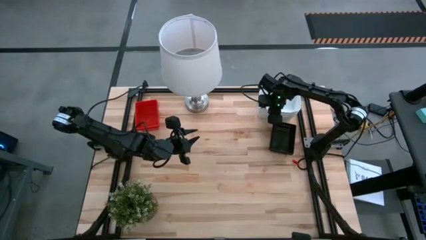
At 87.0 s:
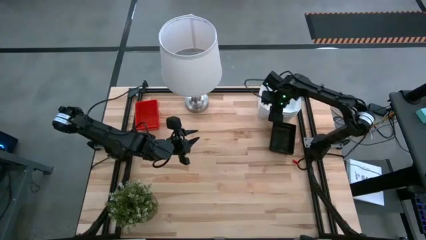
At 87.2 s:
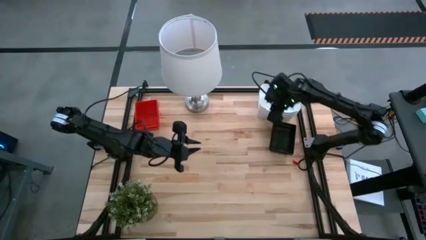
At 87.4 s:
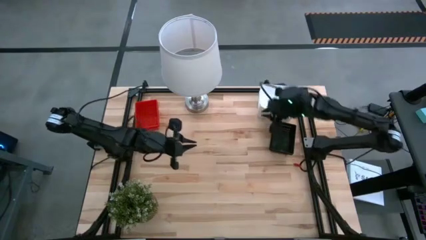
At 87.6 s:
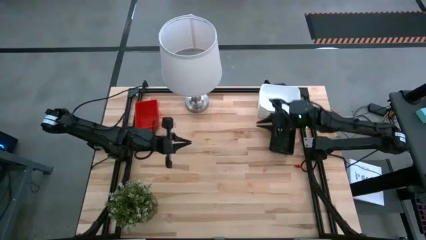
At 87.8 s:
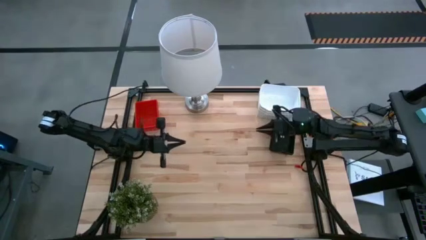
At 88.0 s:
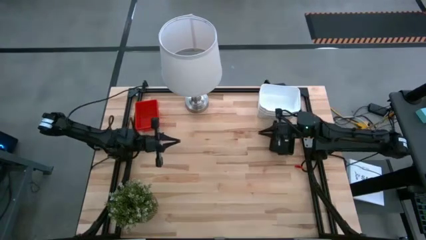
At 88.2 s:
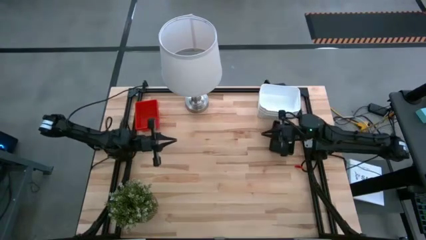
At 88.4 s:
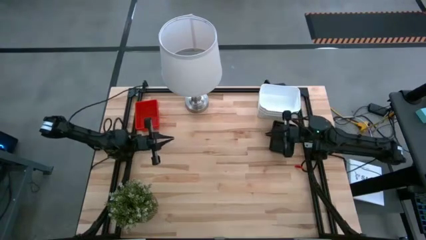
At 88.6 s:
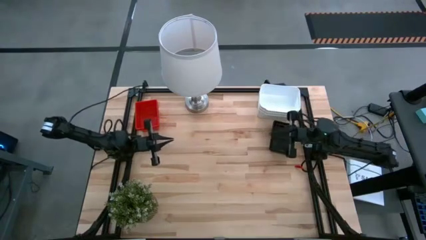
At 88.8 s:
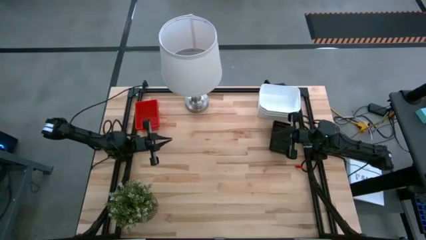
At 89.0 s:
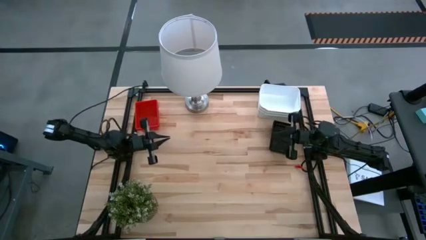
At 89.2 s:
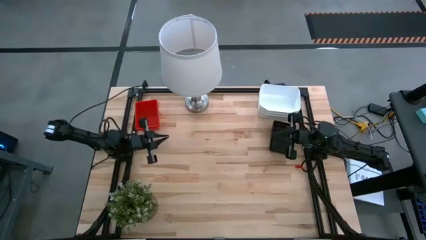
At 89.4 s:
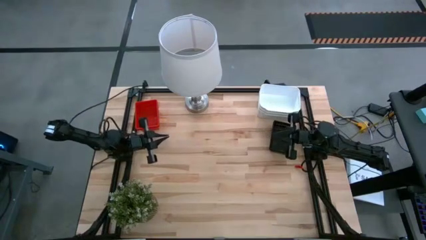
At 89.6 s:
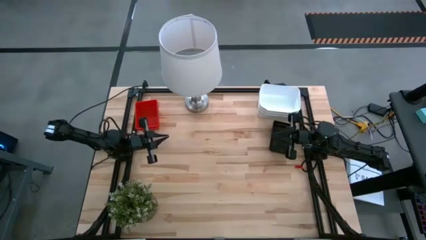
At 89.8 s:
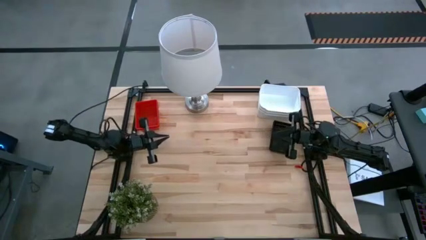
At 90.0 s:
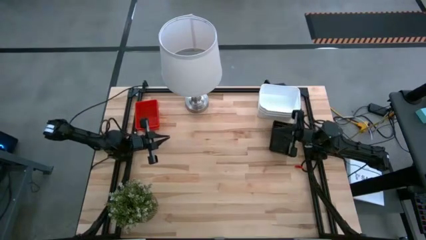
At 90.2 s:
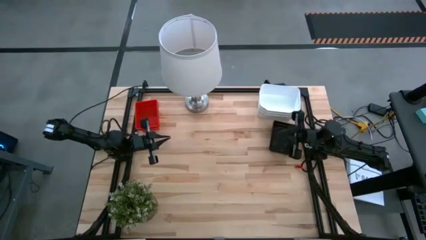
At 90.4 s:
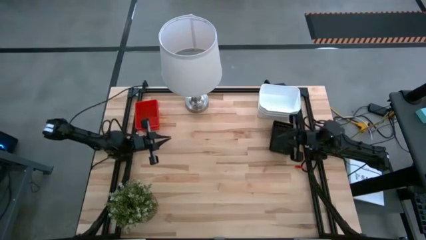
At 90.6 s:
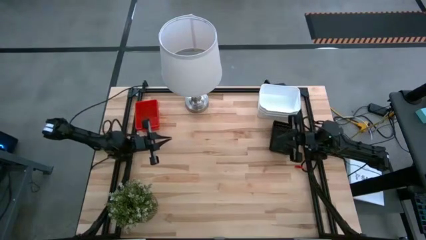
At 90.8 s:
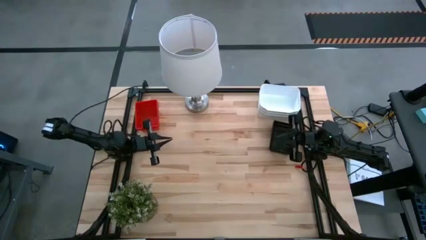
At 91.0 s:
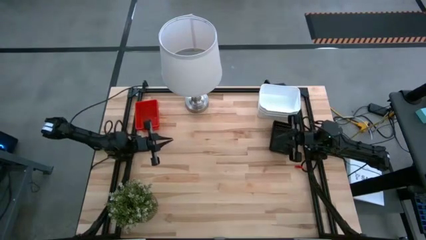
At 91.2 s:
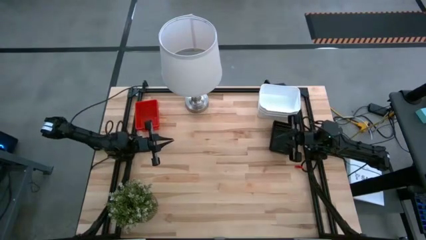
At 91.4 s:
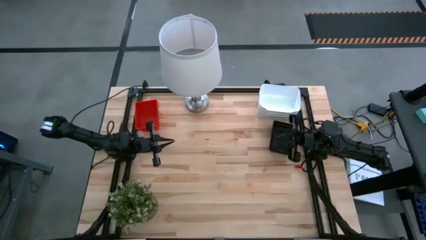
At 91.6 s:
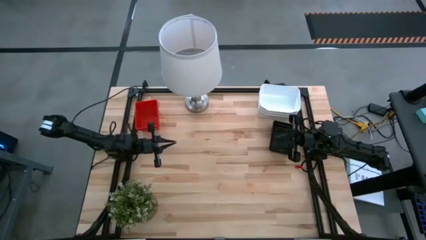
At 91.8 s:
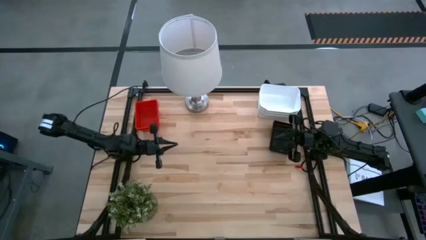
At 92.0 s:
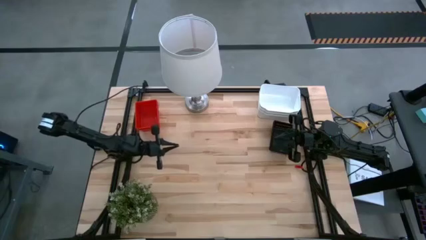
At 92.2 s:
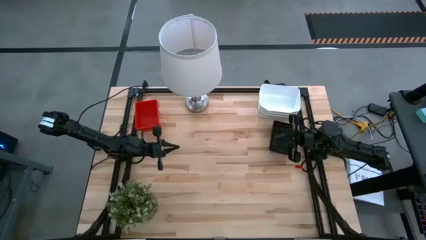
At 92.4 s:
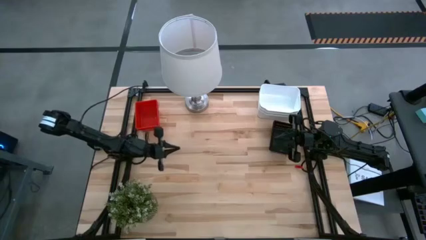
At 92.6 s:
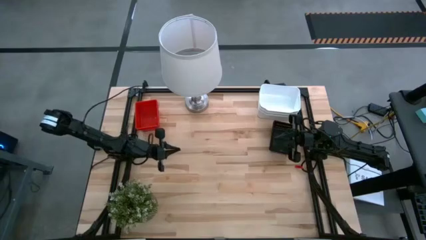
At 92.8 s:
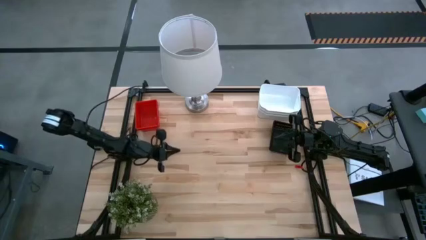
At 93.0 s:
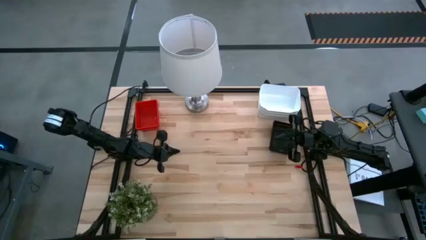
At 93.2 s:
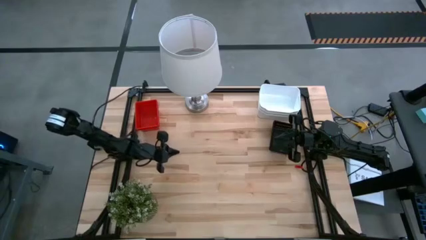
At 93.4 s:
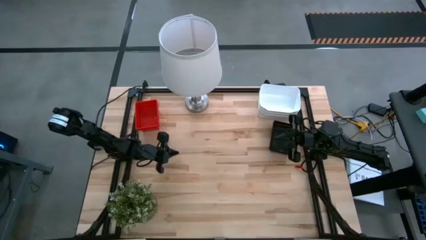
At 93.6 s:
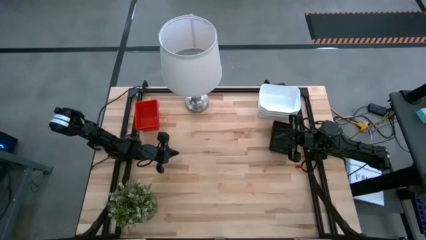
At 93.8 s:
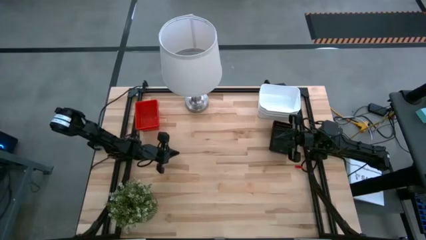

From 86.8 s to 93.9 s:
Return to Home Position

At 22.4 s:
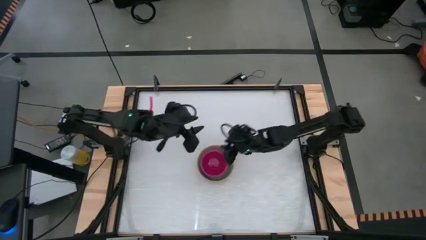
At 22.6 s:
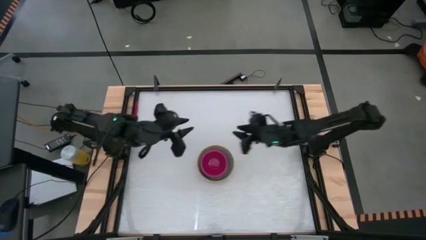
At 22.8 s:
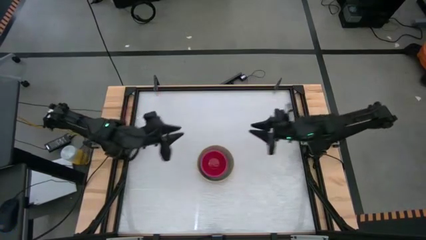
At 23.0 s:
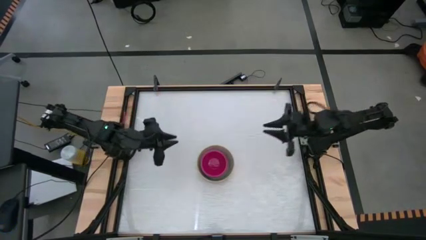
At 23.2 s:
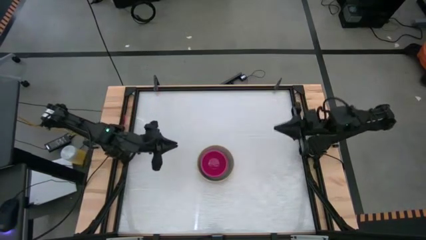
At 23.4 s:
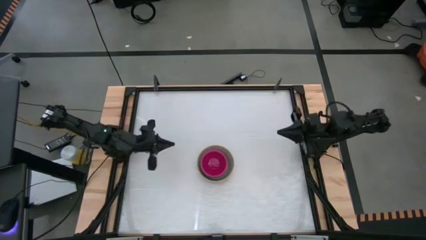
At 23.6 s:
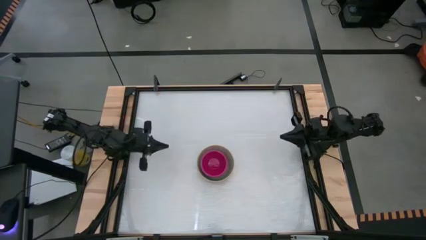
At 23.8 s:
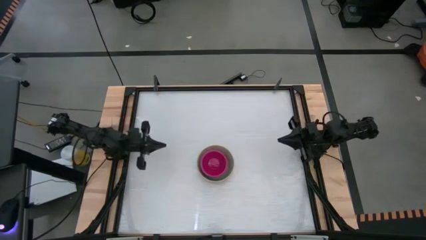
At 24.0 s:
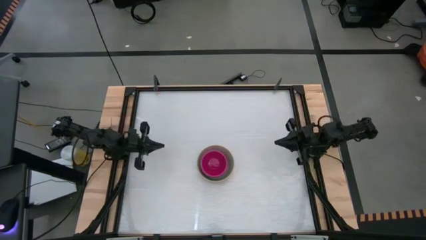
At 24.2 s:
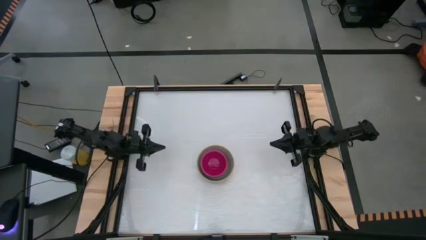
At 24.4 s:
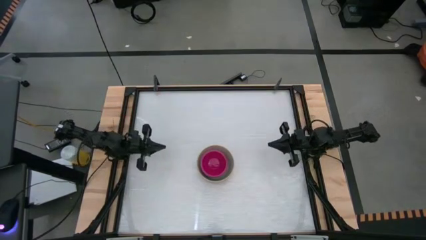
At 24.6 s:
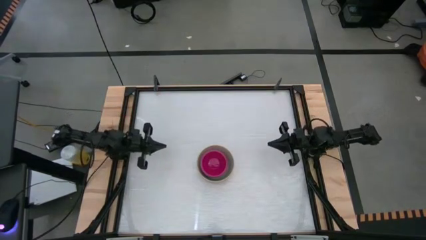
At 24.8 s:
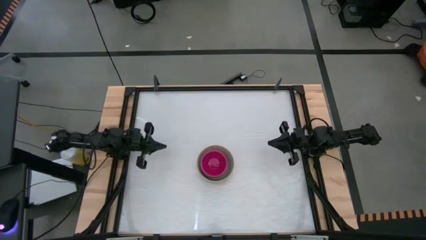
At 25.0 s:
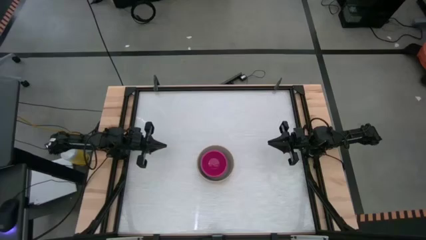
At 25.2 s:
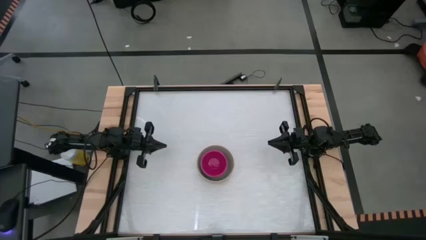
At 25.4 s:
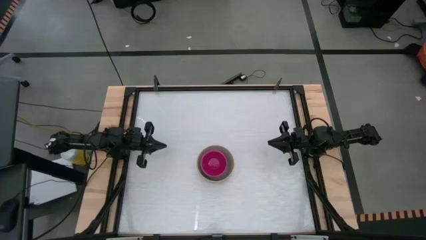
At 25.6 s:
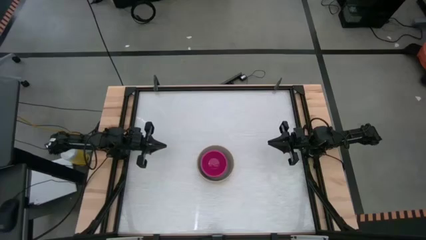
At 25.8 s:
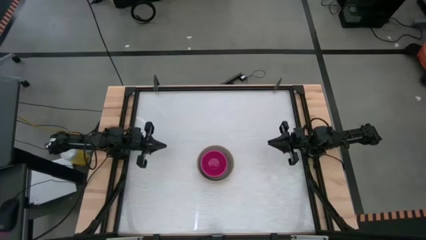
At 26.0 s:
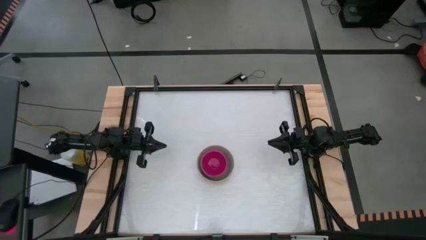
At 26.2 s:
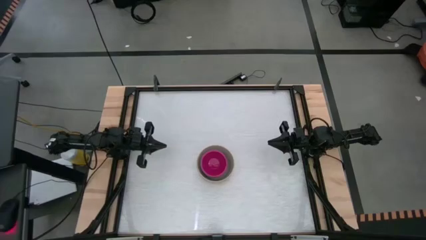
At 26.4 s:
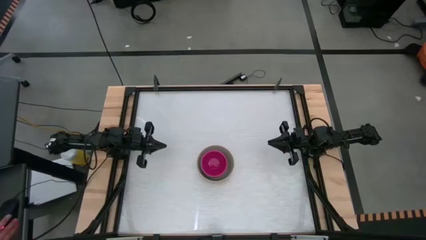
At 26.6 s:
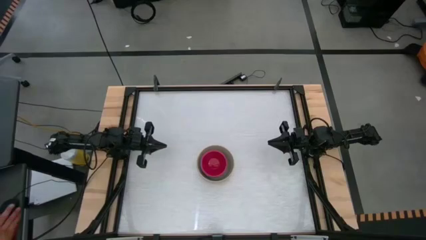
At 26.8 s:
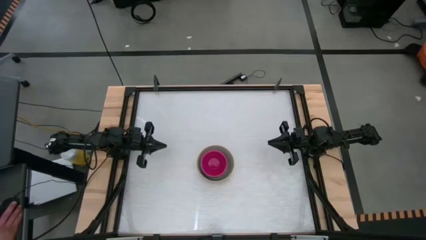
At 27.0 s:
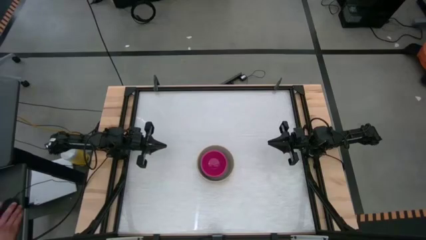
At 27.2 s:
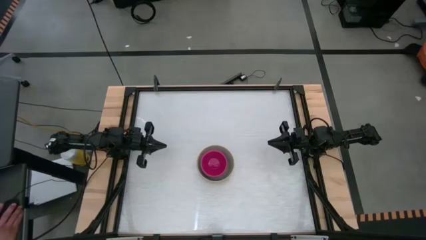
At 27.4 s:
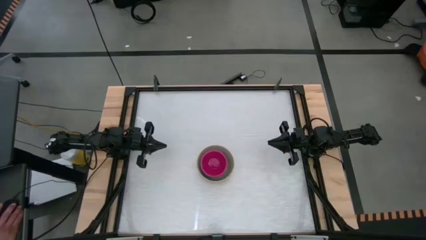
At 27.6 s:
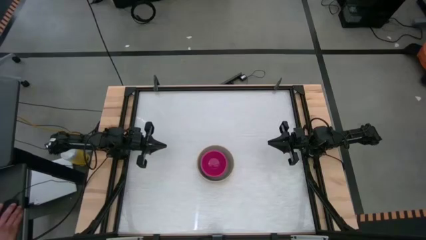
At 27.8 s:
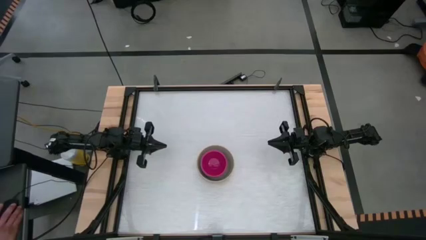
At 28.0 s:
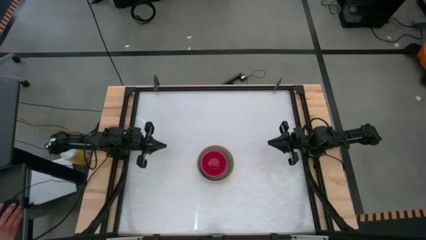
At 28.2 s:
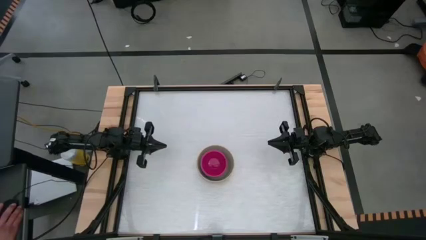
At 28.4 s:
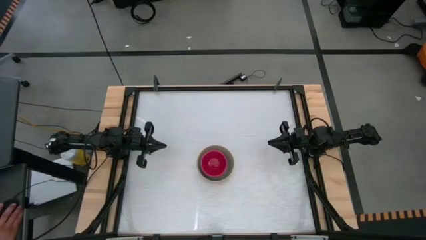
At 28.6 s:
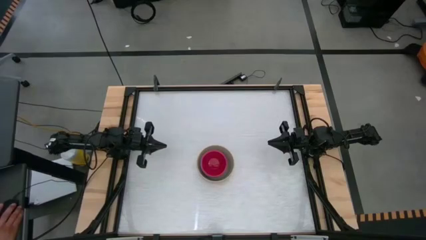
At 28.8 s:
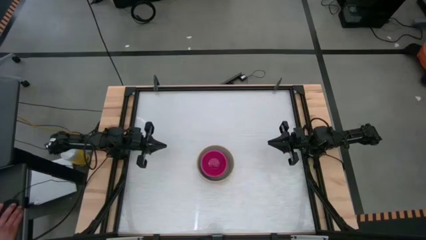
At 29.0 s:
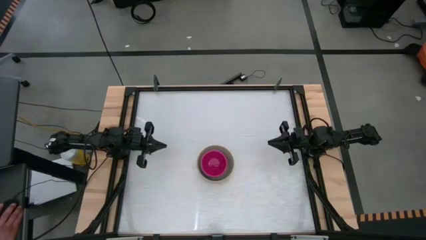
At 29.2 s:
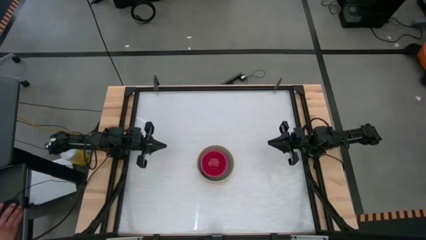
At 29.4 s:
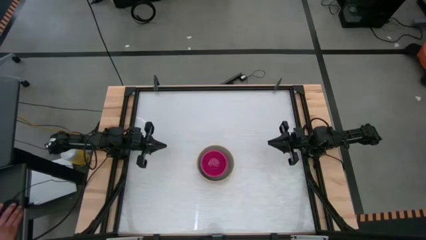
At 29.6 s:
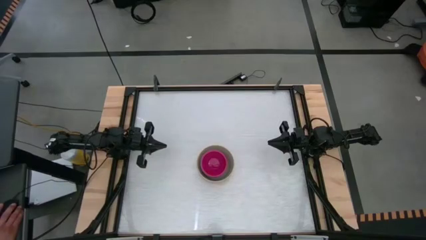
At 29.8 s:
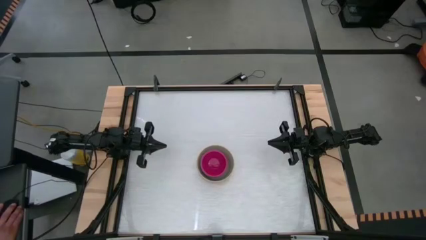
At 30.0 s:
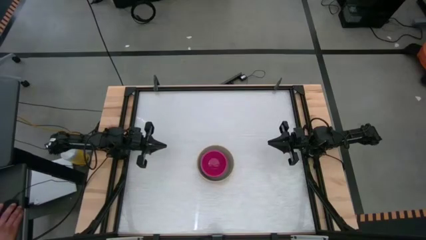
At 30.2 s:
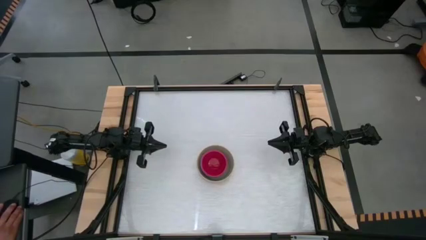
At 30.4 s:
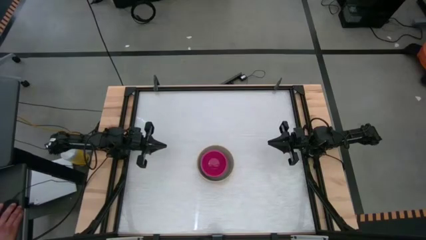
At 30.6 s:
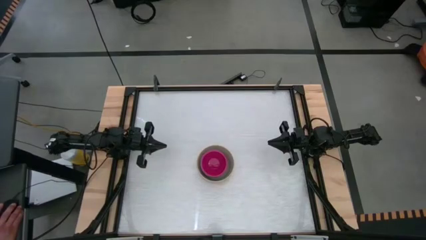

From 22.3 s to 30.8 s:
Return to Home Position
